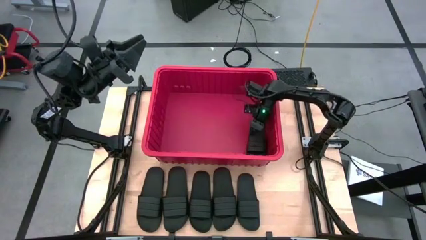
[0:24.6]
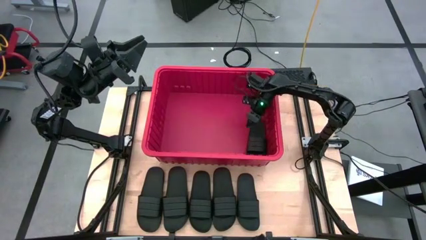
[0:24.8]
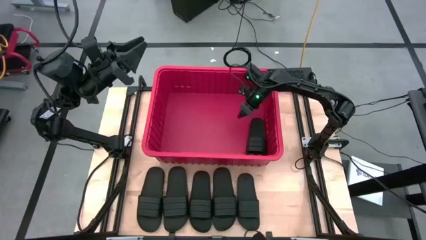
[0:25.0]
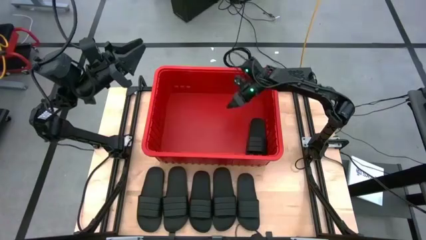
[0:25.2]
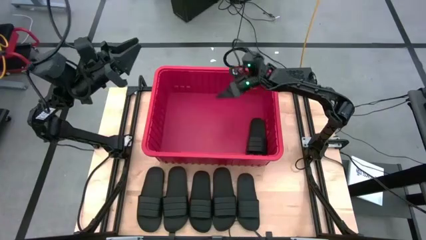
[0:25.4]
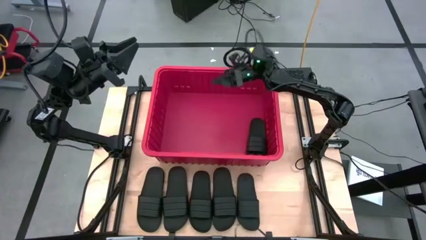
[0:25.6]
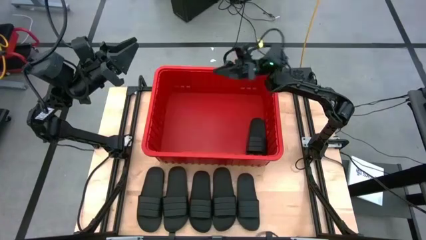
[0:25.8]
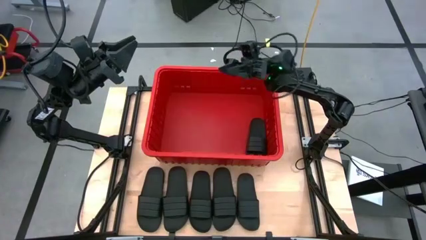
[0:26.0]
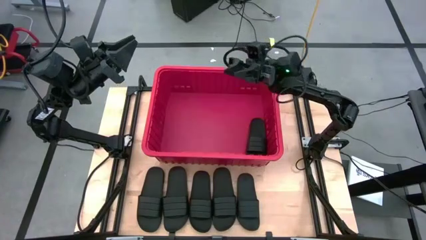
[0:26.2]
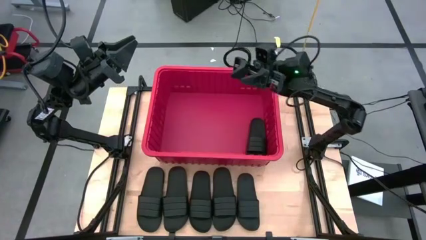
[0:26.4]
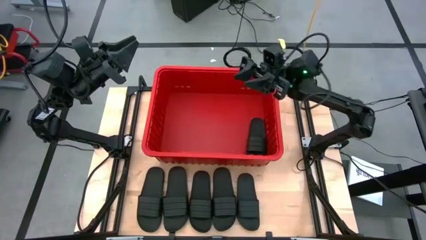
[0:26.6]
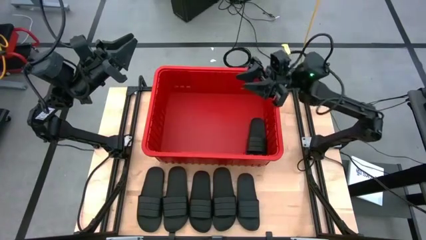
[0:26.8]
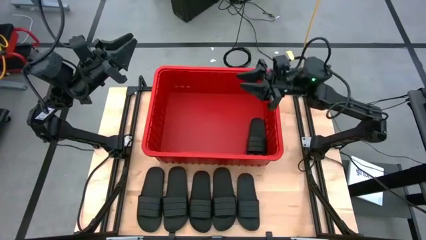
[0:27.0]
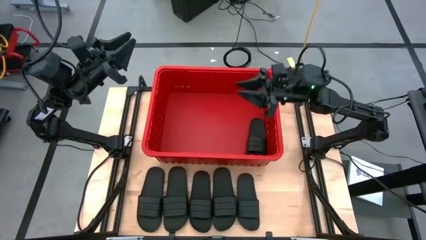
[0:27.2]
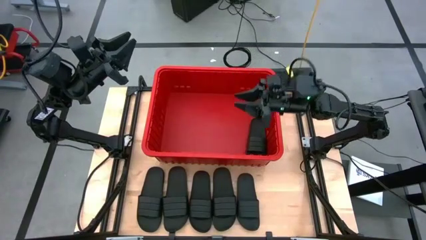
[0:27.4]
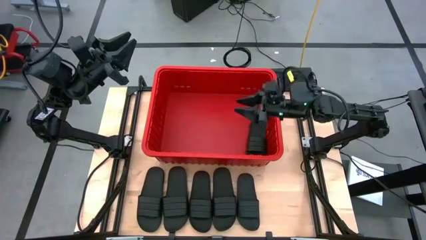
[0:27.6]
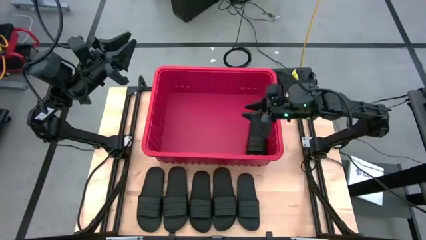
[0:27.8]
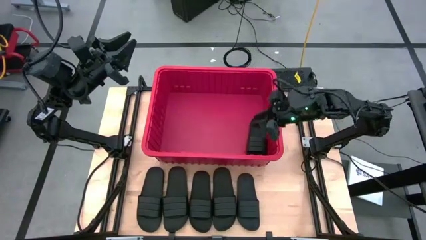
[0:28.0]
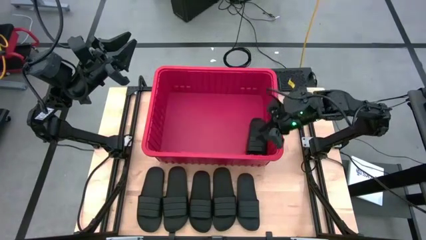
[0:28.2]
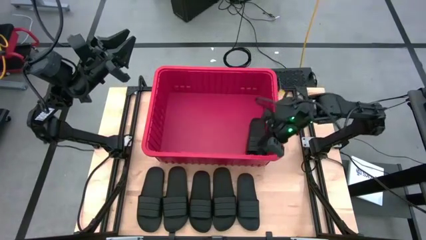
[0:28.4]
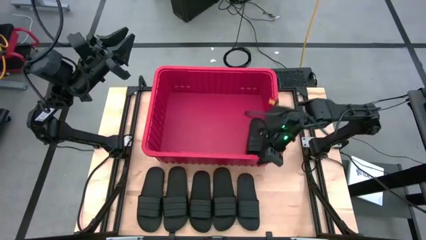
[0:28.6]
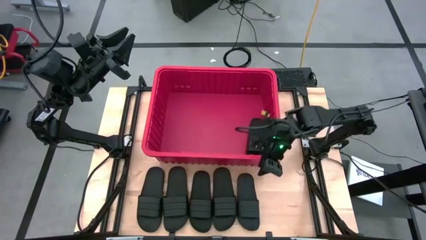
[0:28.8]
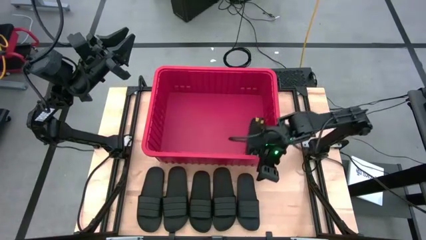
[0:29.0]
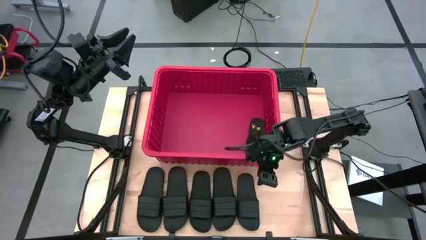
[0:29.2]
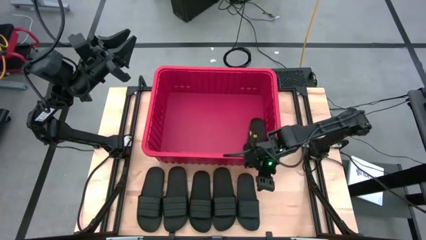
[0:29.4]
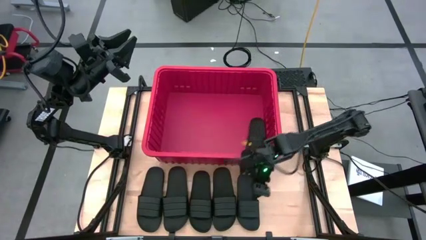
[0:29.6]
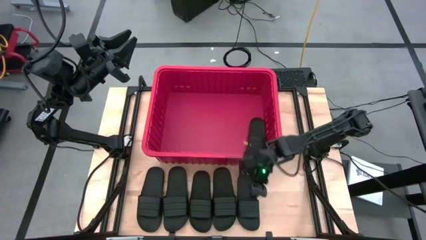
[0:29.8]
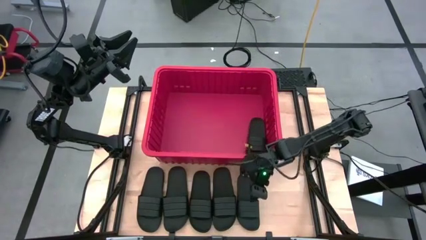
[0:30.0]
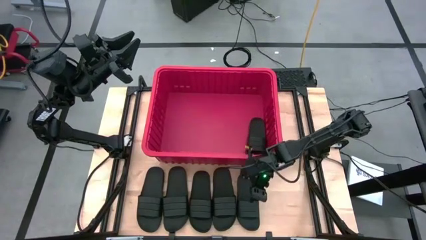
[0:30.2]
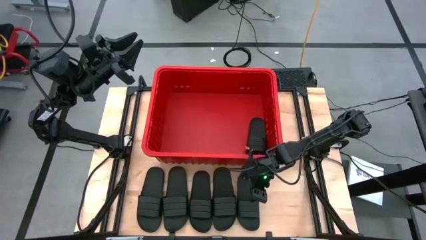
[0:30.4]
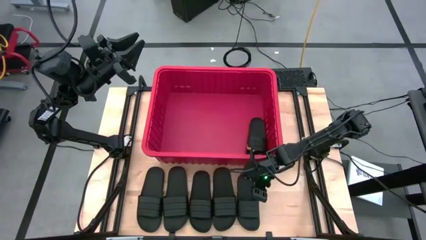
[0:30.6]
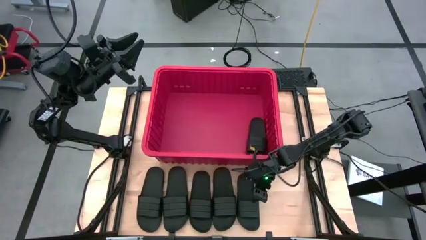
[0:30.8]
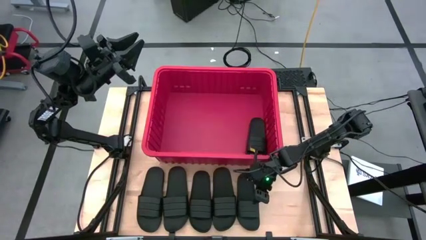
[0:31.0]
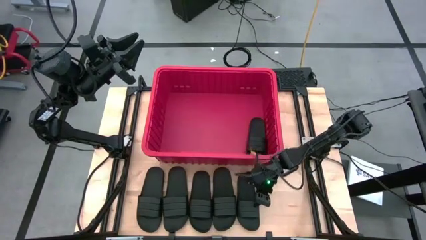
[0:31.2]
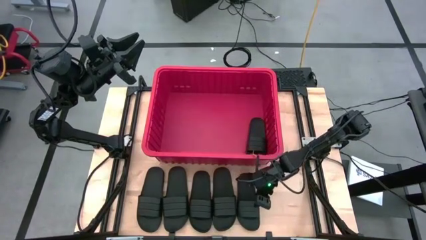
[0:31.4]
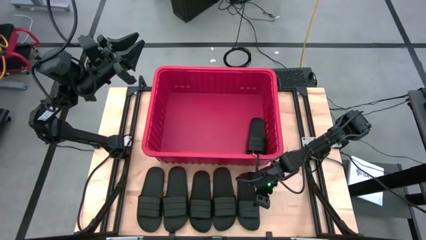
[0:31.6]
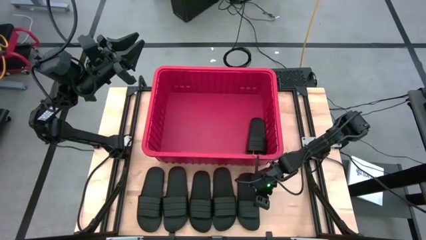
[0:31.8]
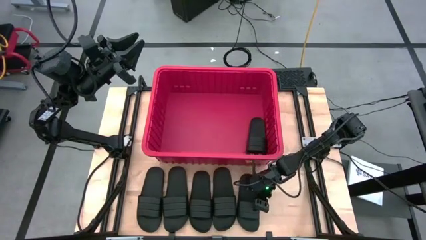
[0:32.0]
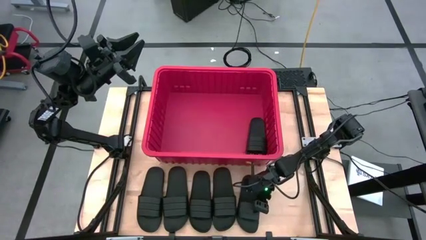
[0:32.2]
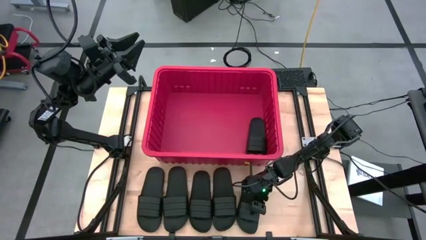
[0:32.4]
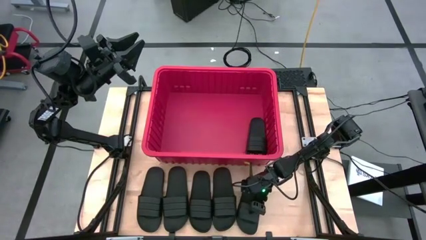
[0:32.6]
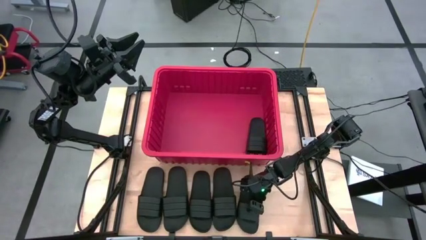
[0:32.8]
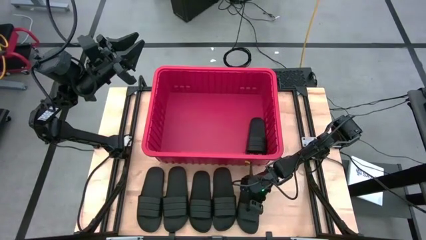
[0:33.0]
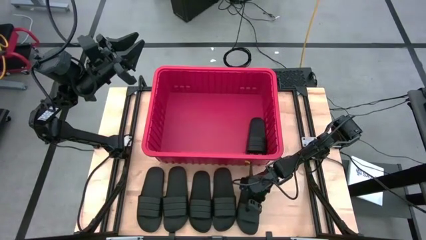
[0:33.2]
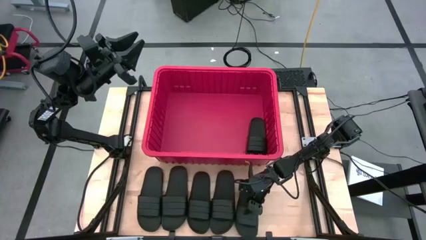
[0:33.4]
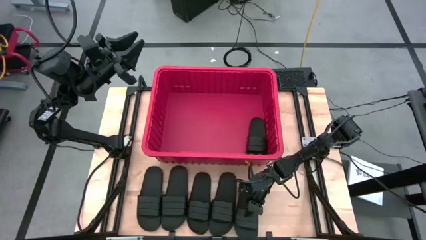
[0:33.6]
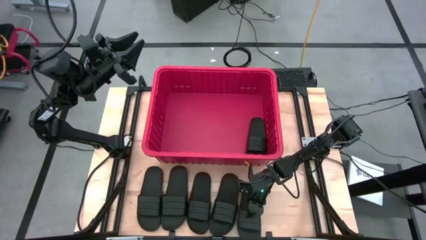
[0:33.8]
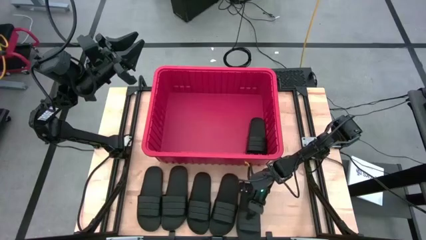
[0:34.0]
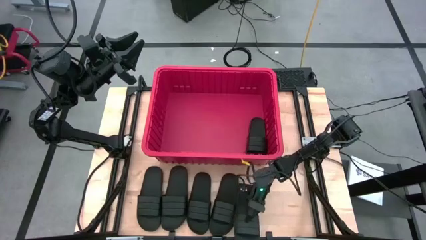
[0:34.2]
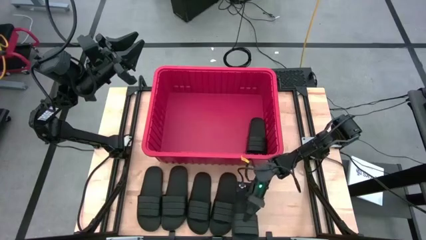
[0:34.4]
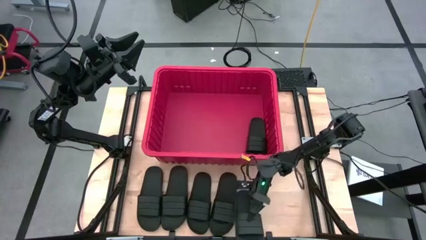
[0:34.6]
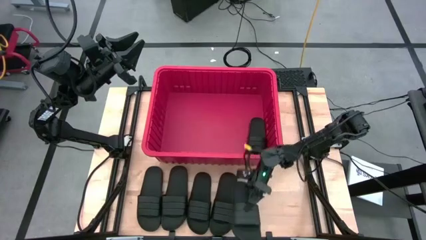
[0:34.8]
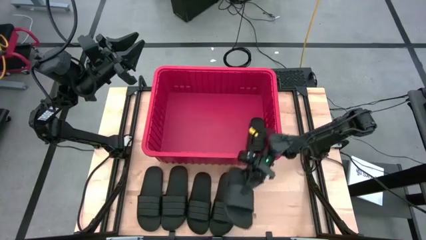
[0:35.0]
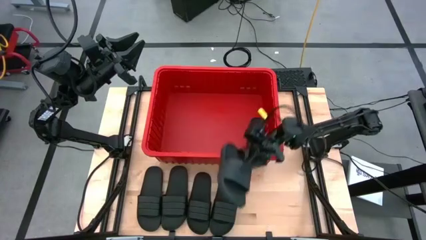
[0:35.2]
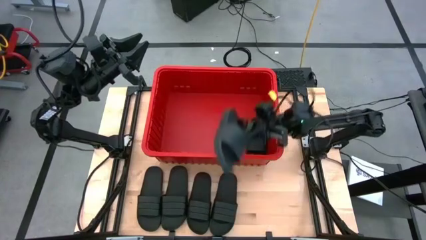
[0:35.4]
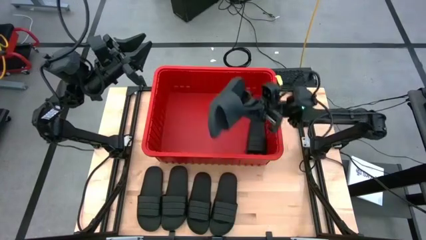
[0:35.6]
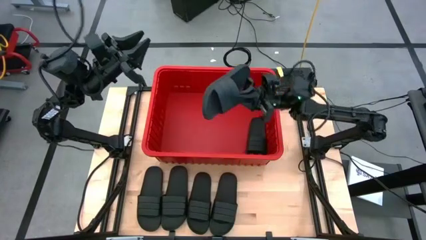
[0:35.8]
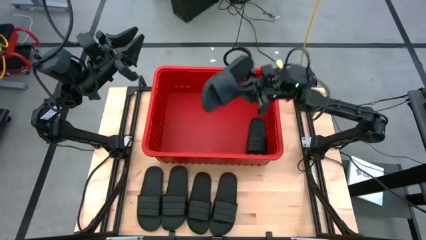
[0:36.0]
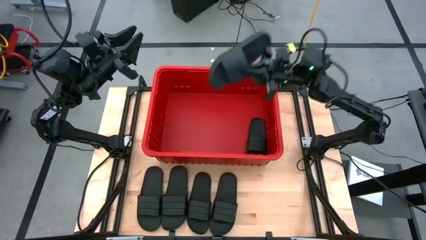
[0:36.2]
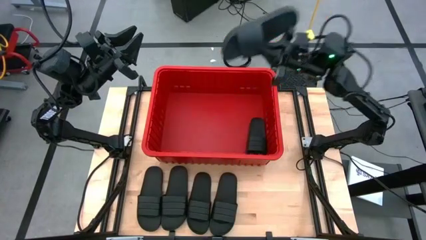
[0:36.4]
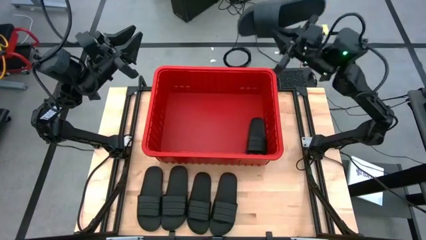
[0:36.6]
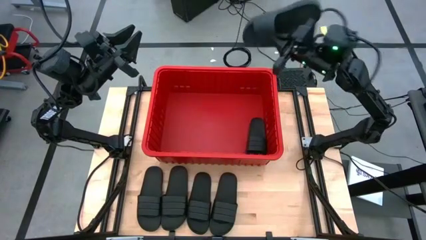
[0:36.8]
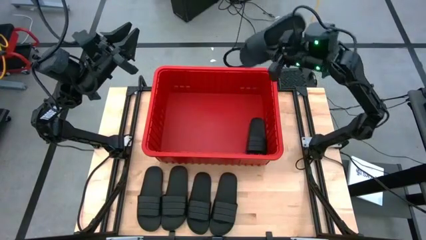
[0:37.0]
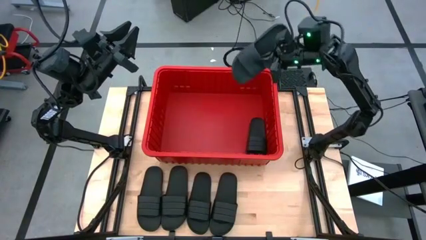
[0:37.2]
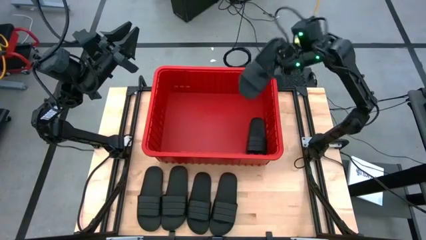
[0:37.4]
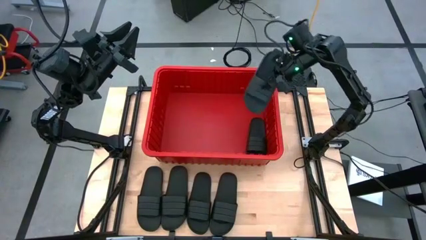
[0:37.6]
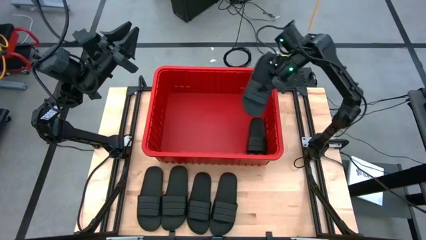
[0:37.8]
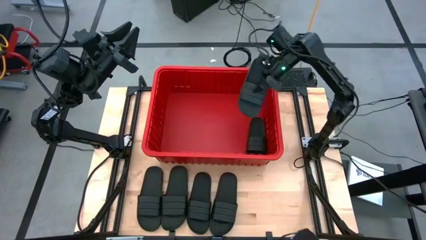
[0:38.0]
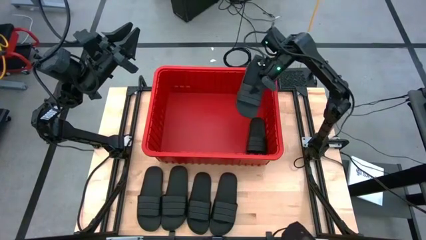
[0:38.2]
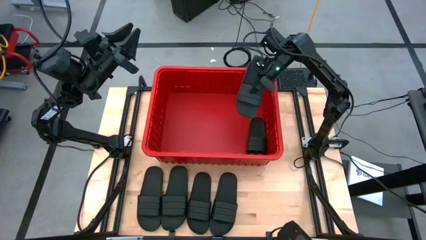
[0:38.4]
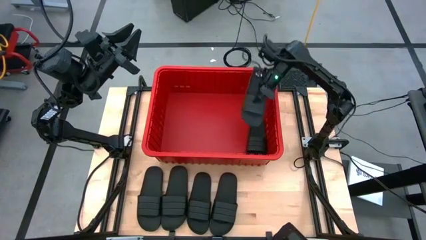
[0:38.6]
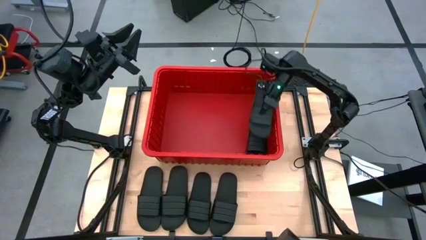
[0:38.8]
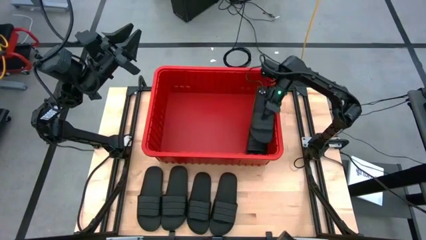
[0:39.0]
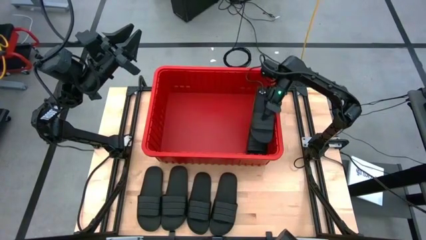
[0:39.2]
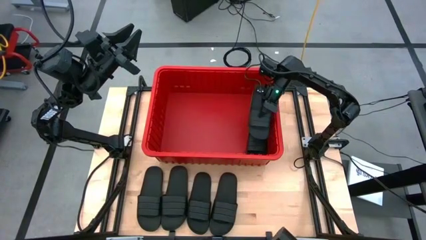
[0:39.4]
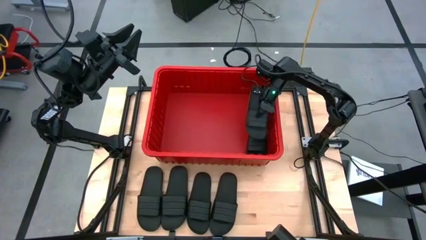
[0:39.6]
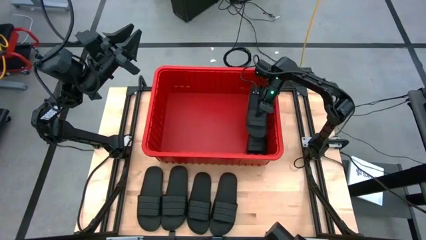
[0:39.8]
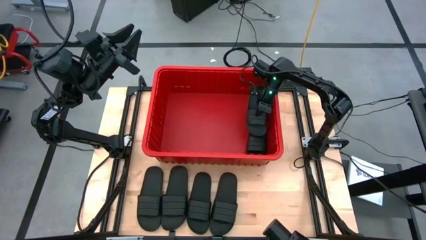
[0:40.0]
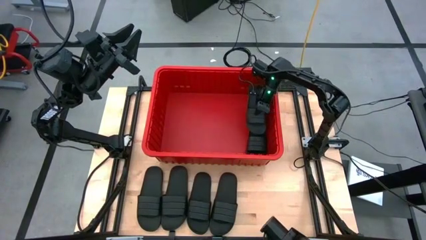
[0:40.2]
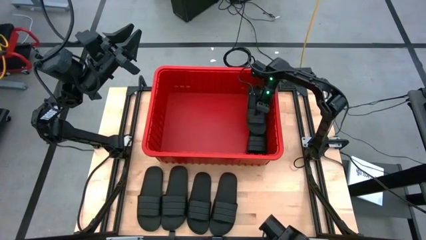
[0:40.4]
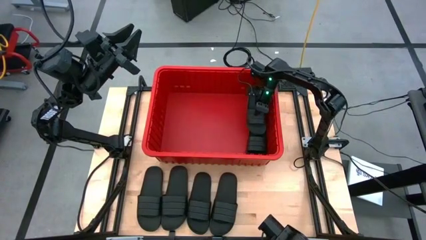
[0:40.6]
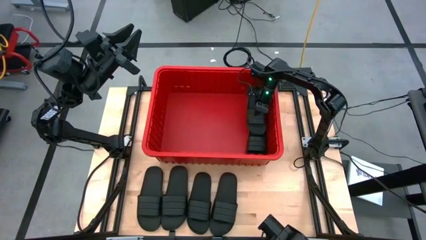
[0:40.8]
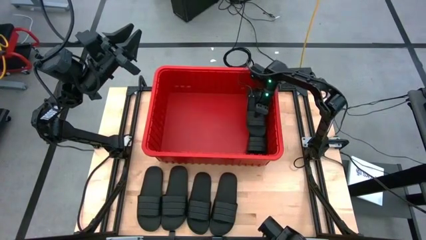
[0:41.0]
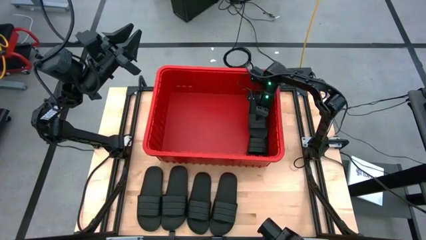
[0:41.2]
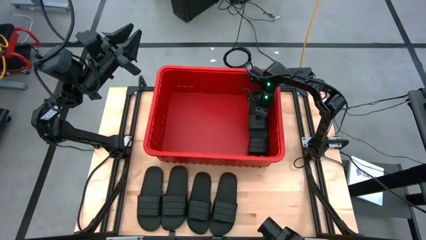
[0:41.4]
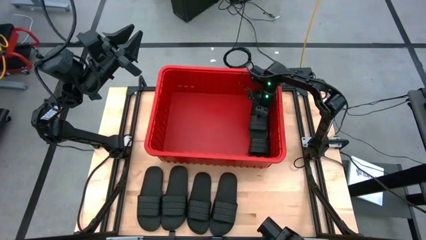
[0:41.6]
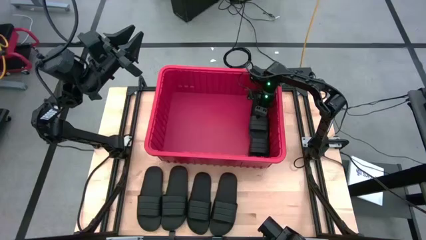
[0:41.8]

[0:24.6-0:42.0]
Task: Pick and place slides into bin
Put the black slide into the red bin
